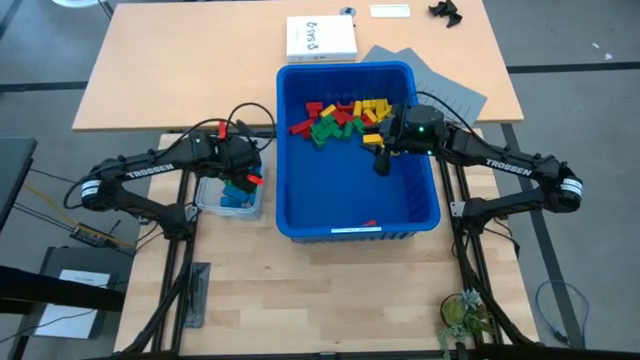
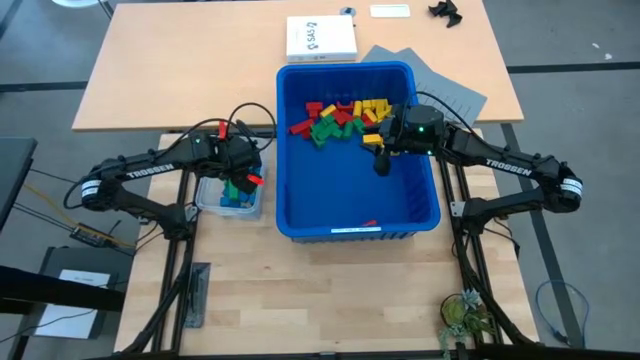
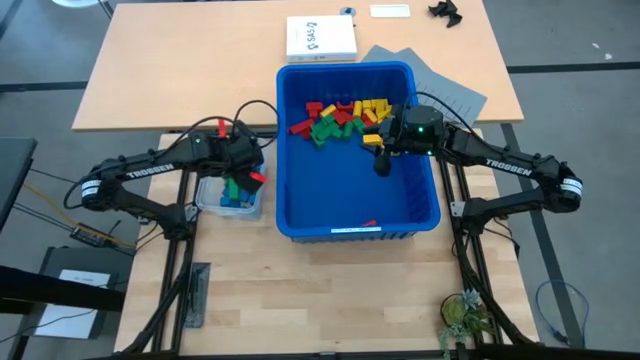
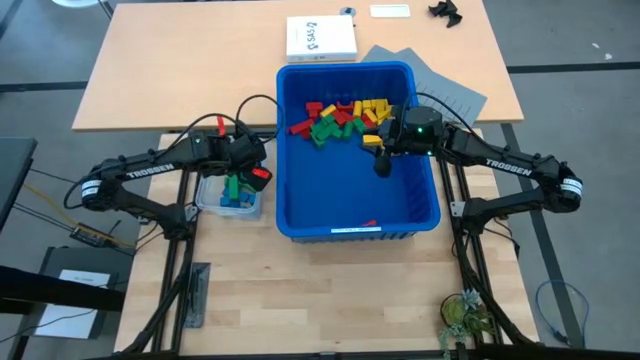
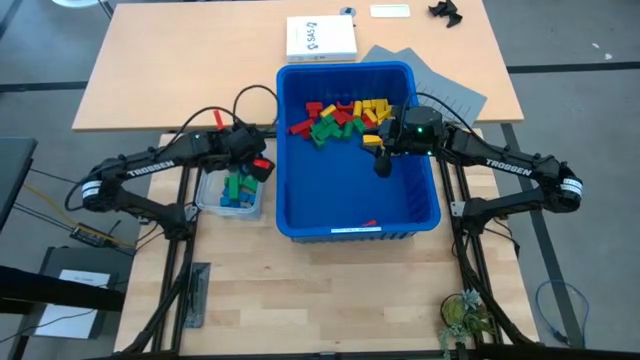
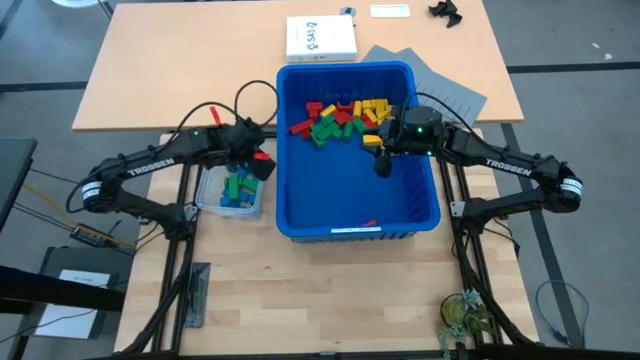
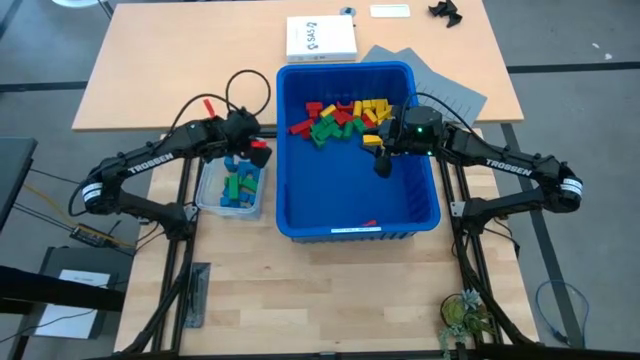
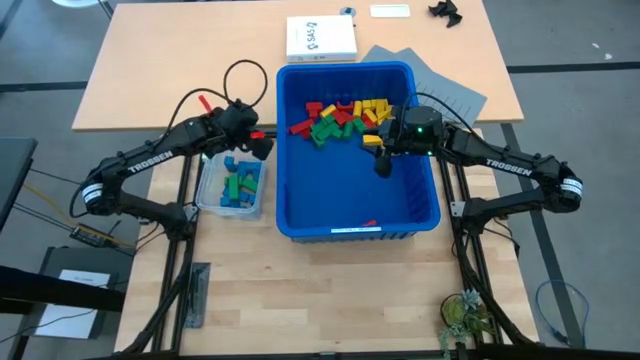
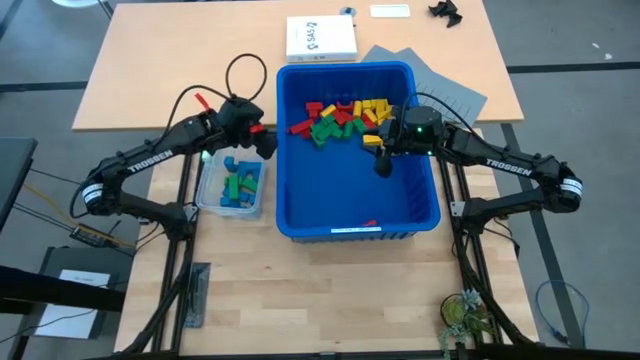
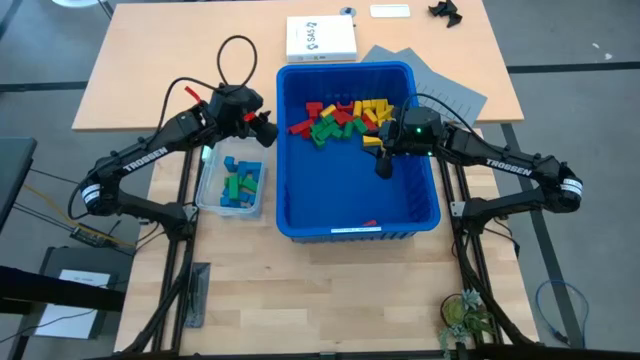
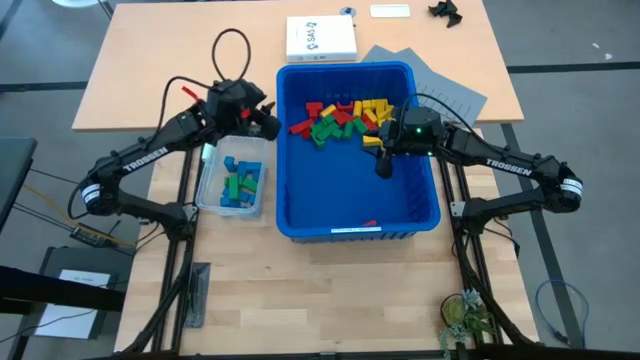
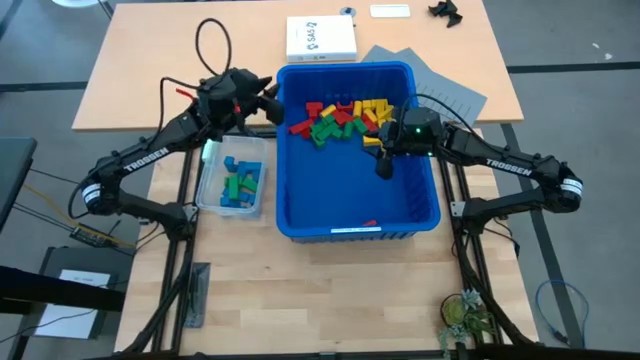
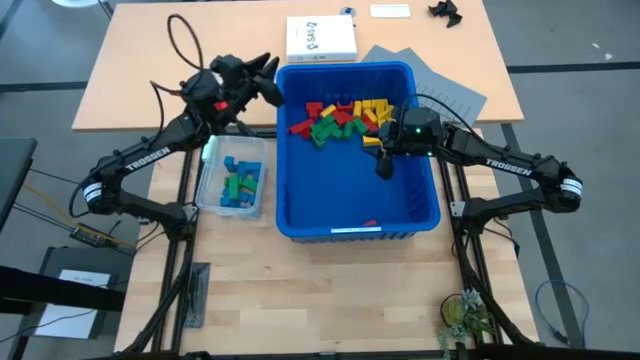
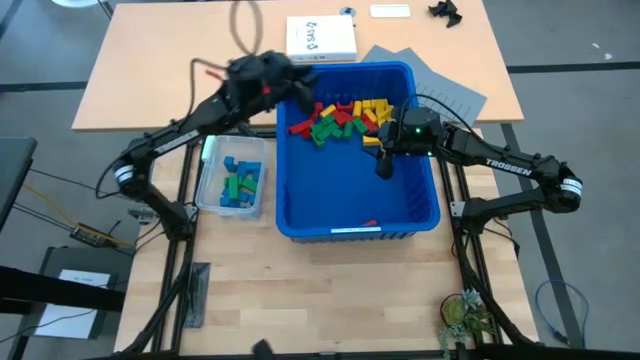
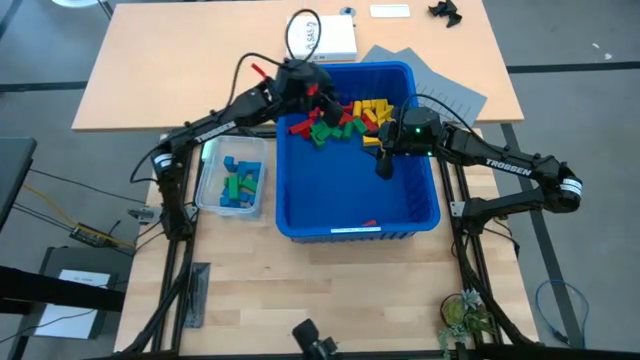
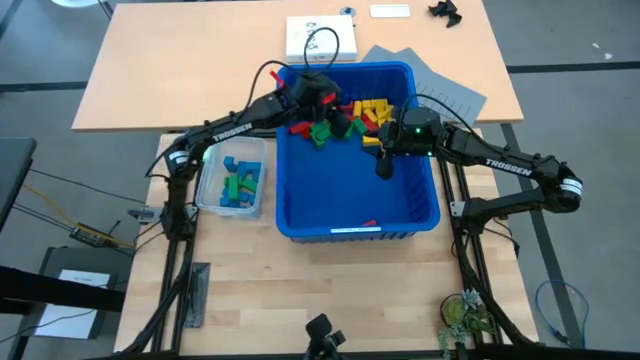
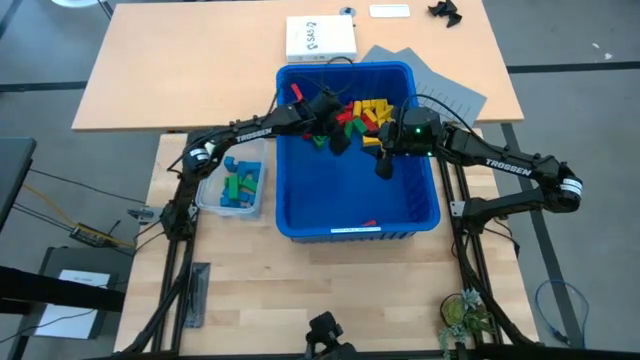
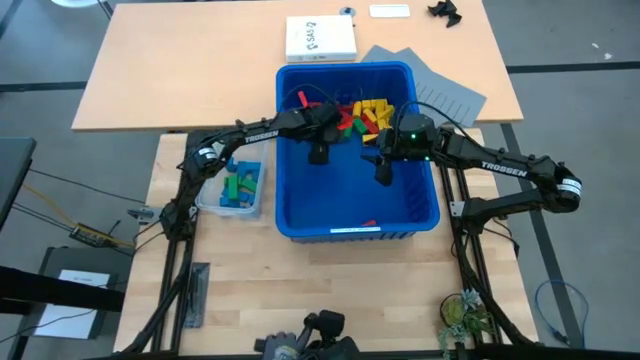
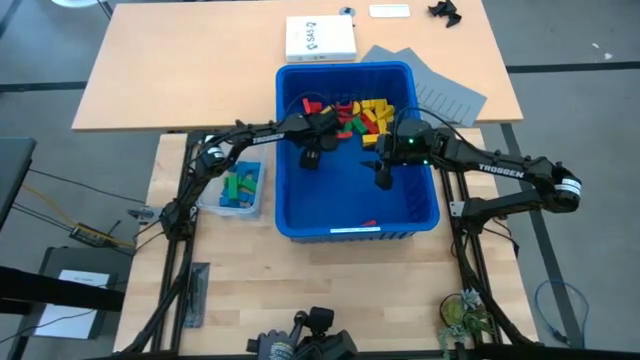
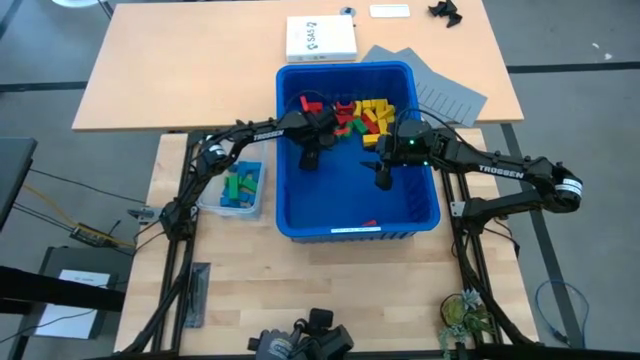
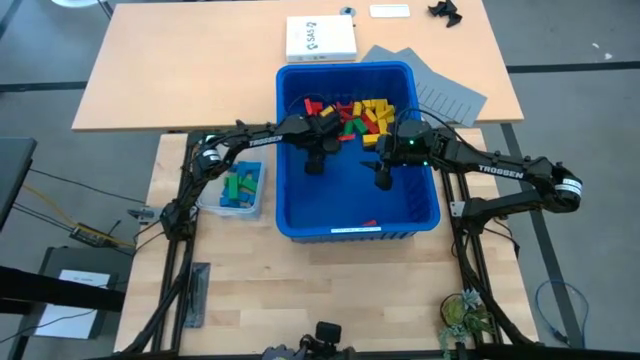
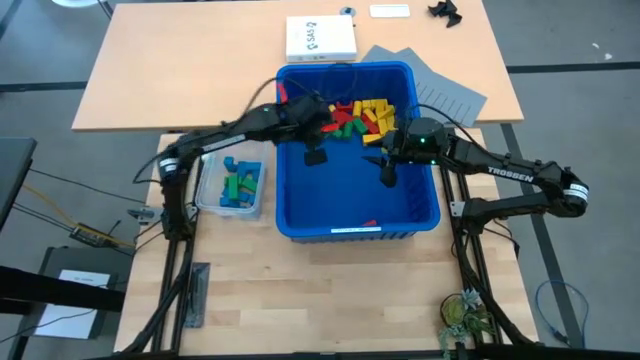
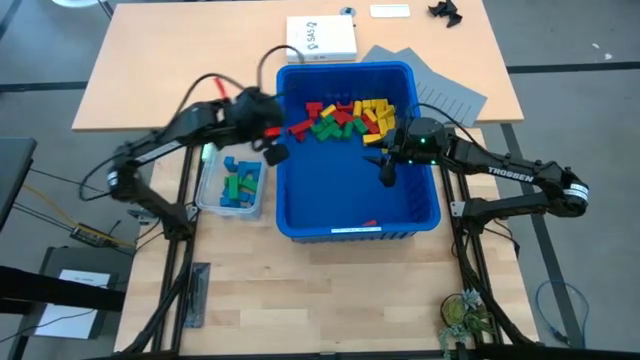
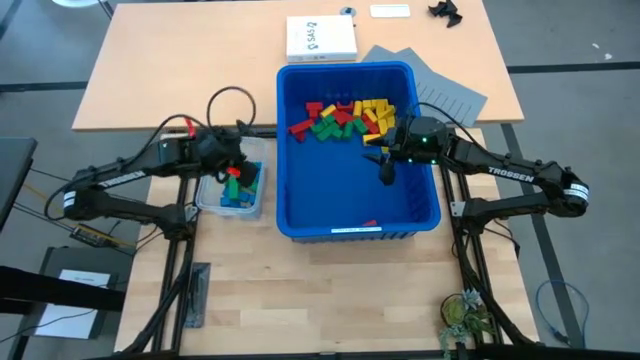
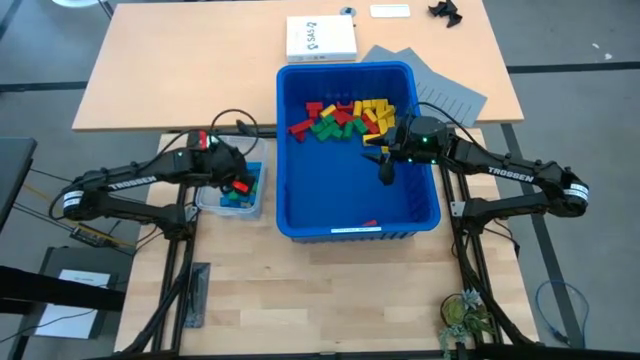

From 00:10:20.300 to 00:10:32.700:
Task: Sort blocks
Put the green block into the transparent bin

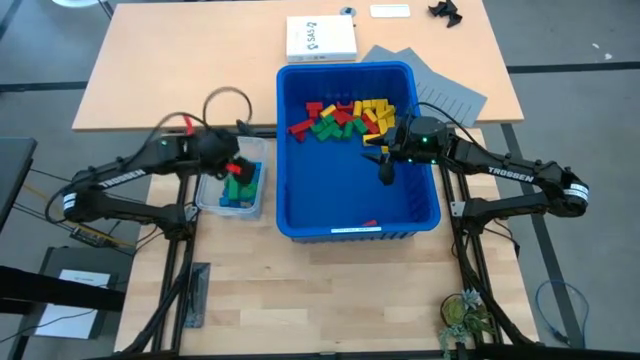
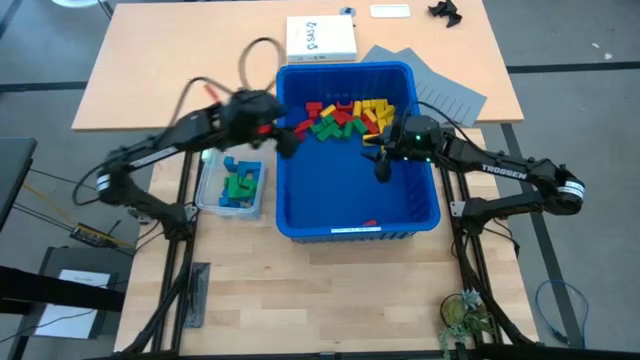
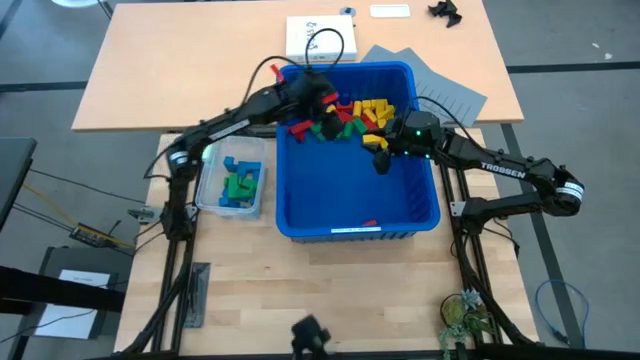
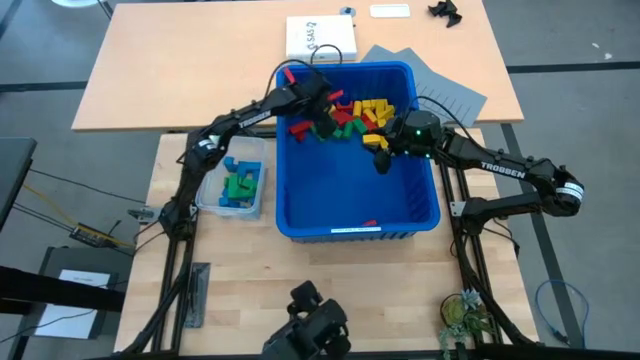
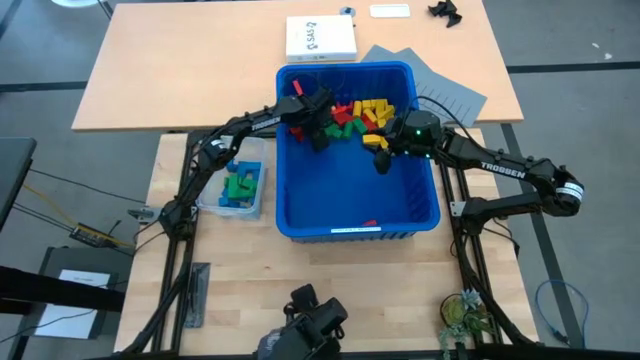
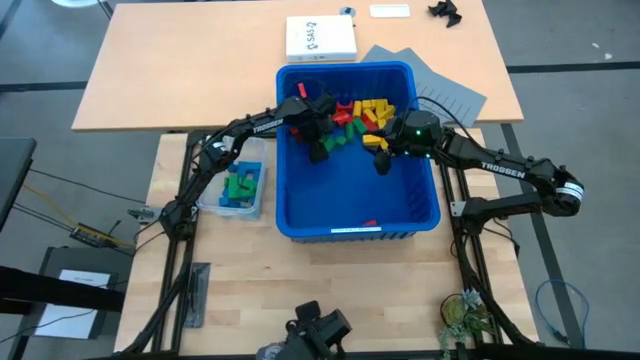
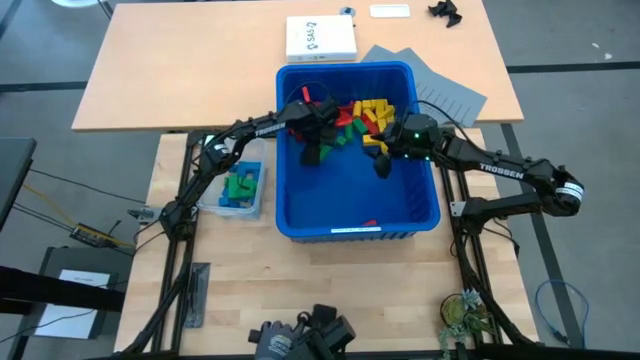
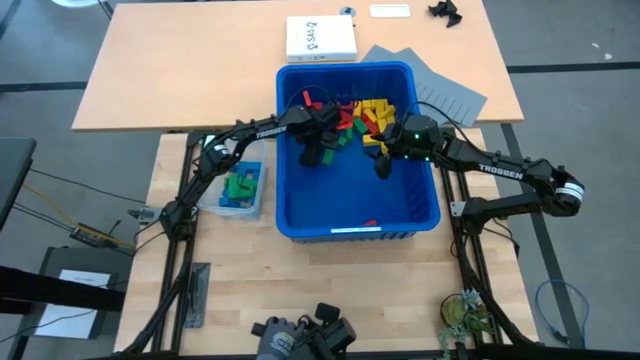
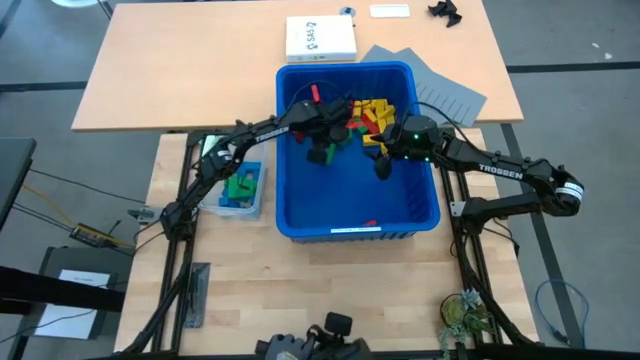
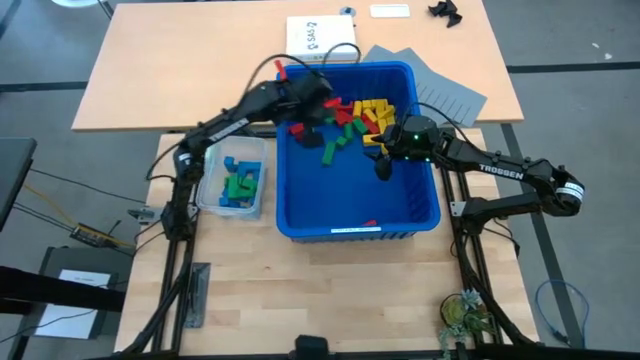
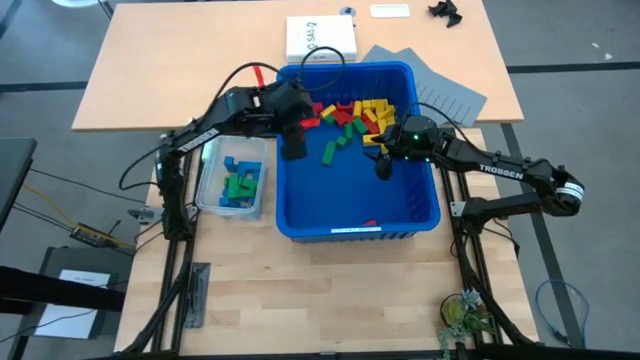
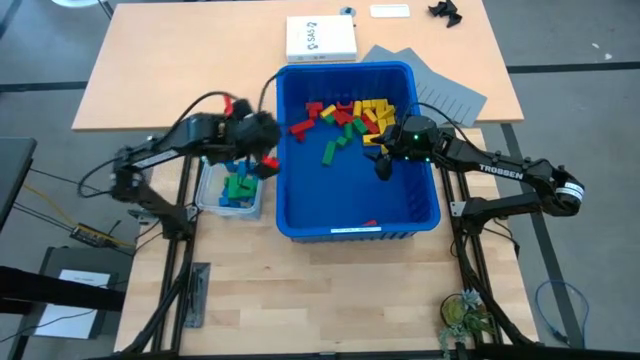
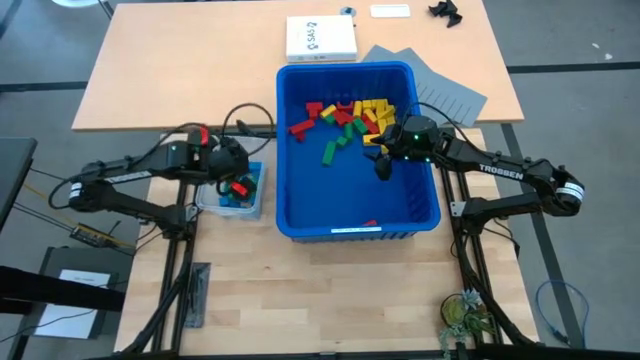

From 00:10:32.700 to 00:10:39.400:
Put the green block into the transparent bin

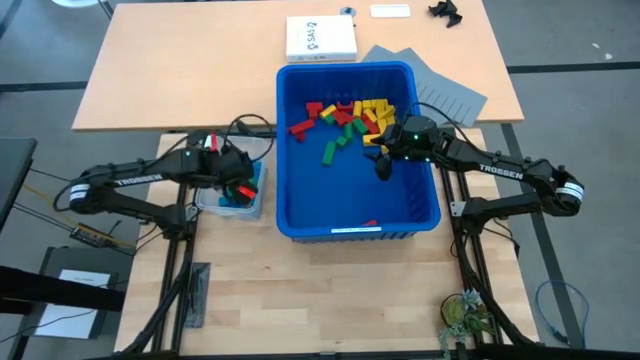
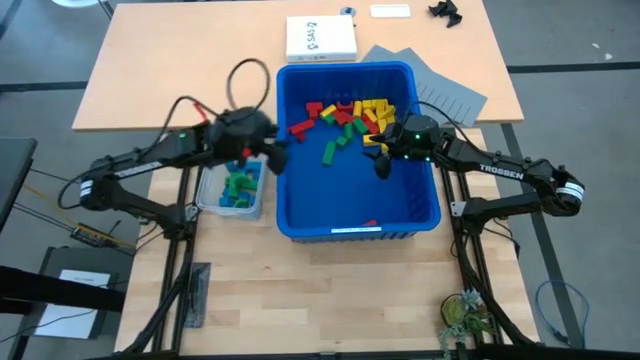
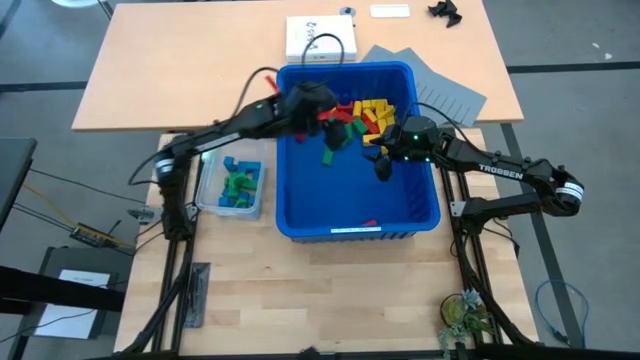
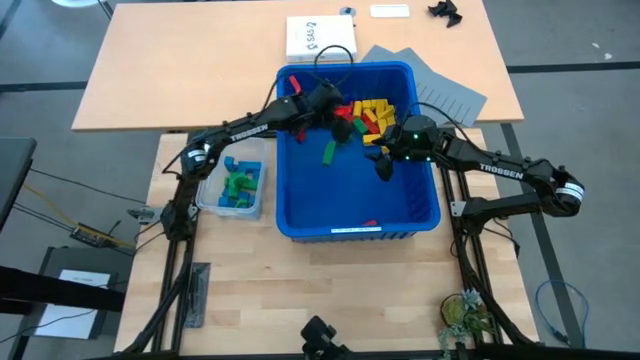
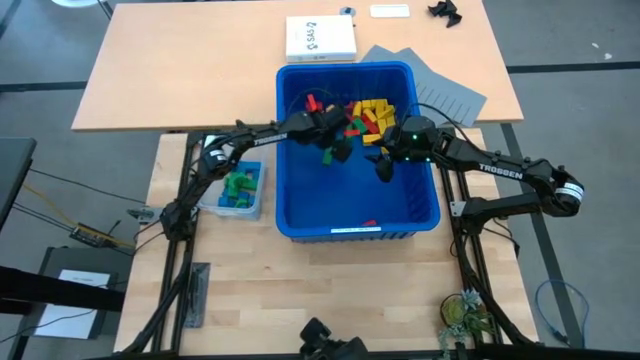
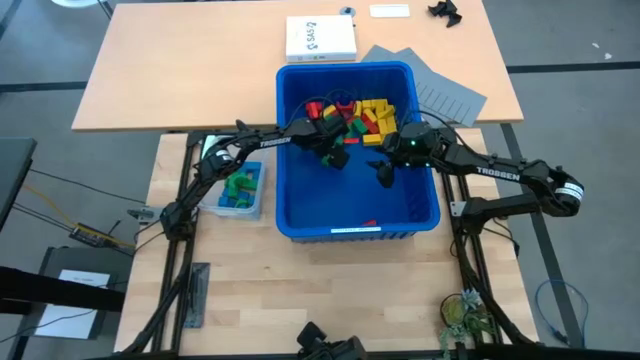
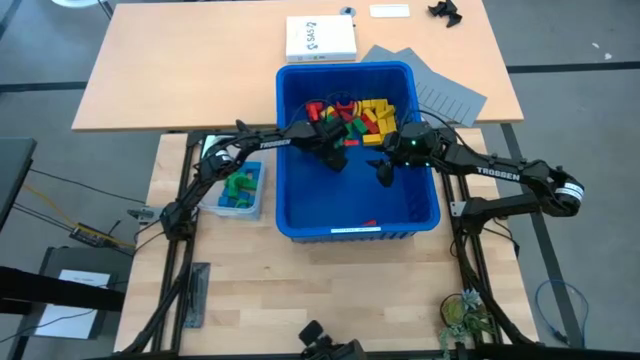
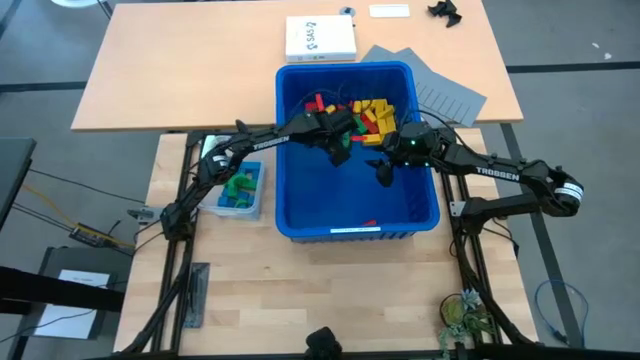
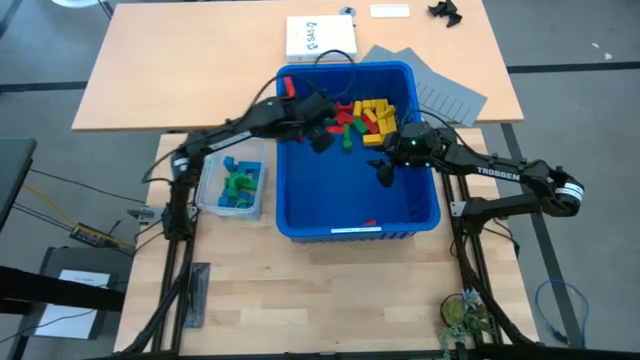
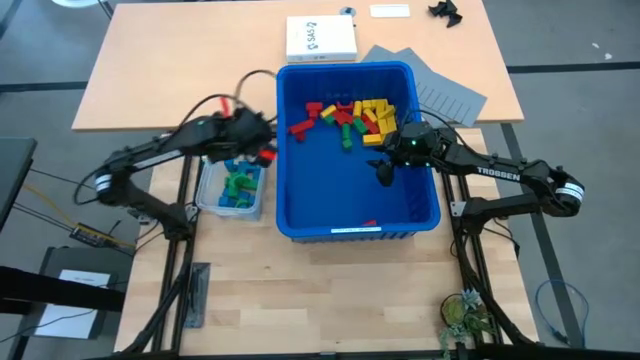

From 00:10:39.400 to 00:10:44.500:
Put the green block into the transparent bin
